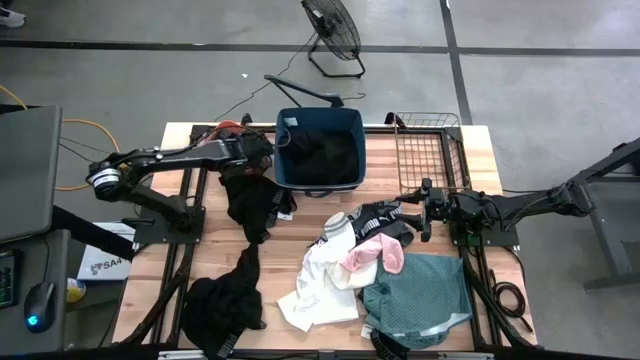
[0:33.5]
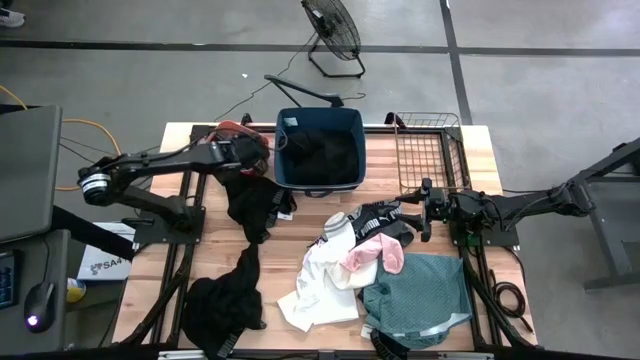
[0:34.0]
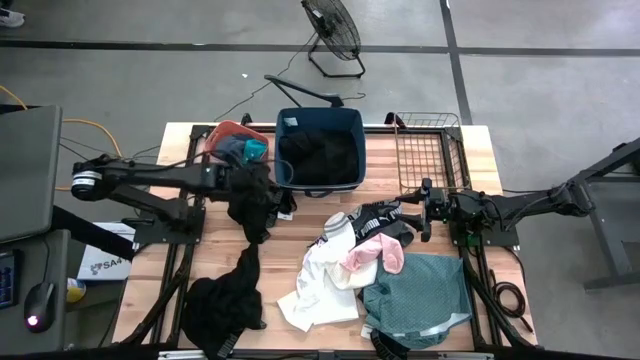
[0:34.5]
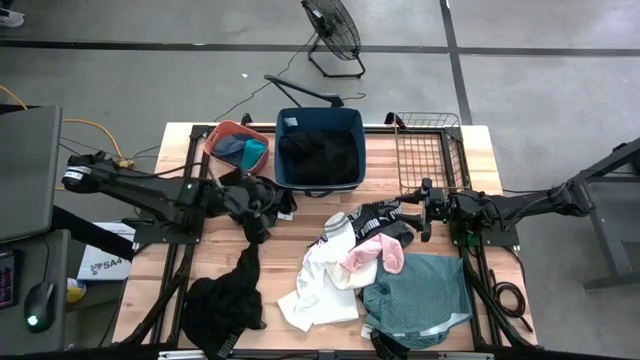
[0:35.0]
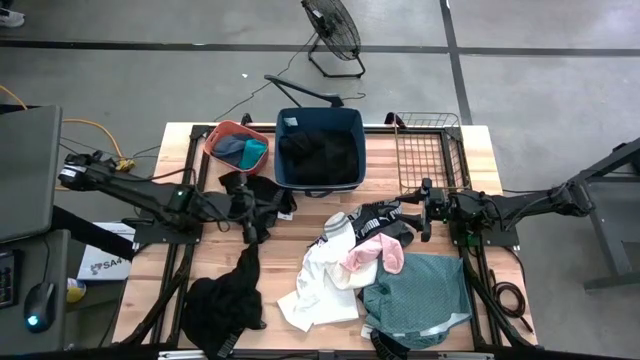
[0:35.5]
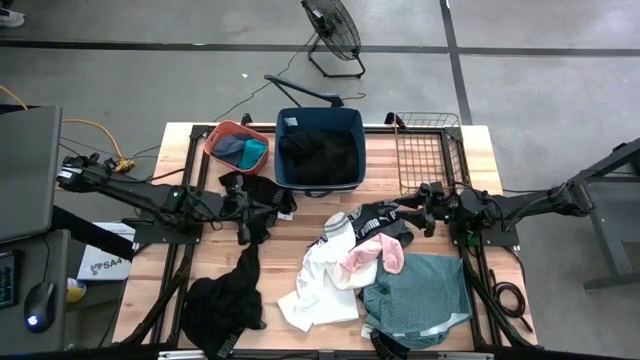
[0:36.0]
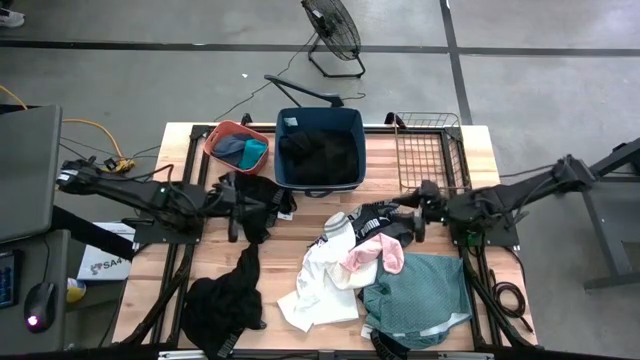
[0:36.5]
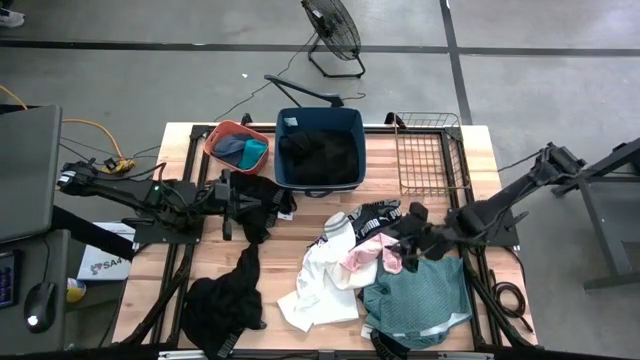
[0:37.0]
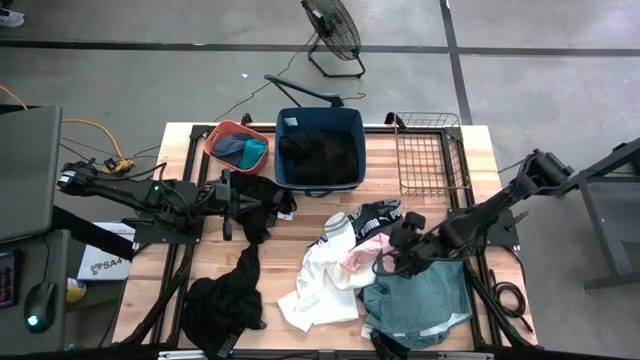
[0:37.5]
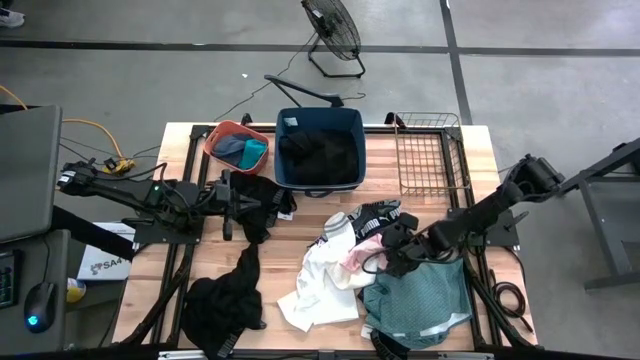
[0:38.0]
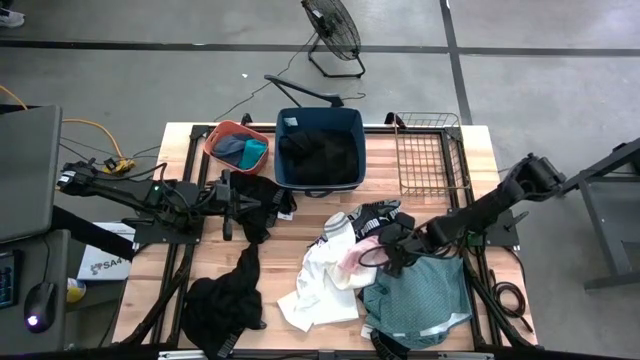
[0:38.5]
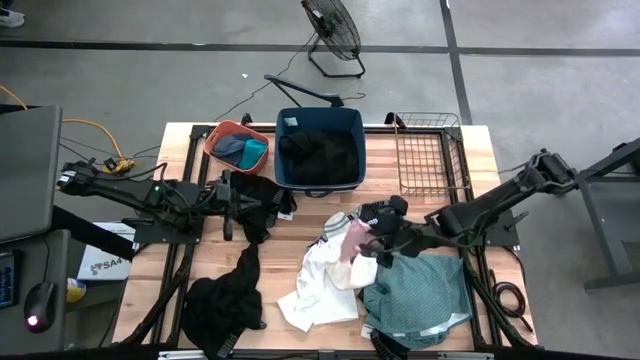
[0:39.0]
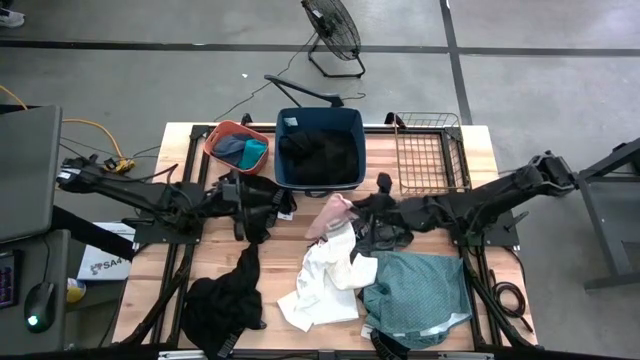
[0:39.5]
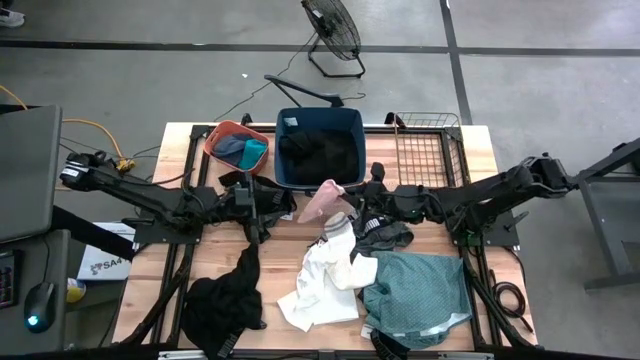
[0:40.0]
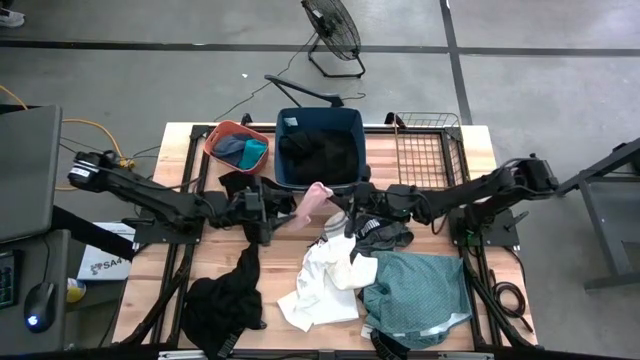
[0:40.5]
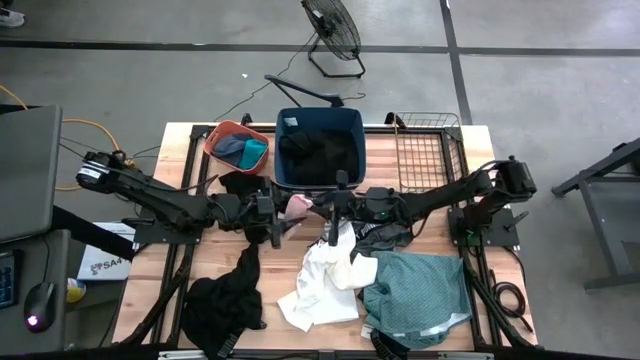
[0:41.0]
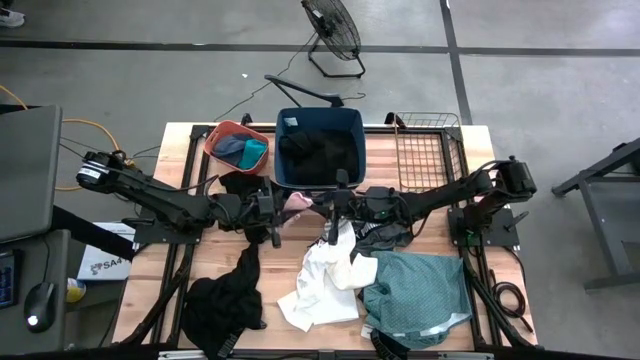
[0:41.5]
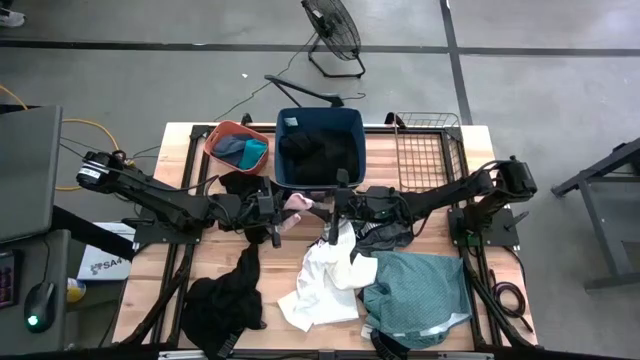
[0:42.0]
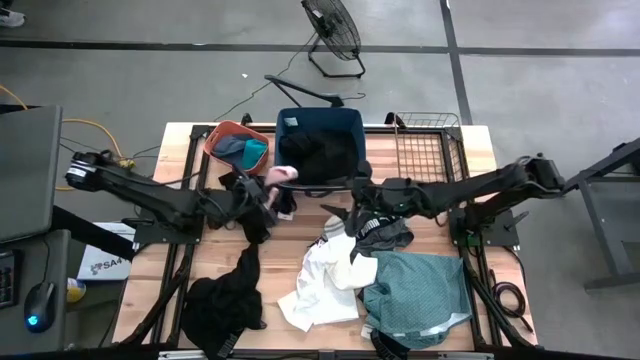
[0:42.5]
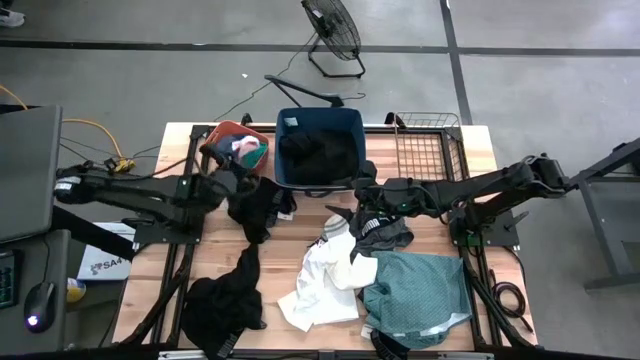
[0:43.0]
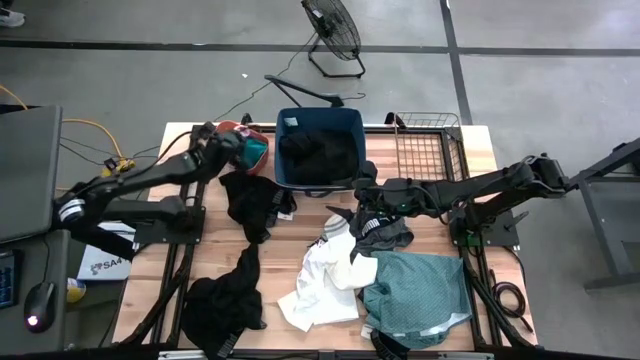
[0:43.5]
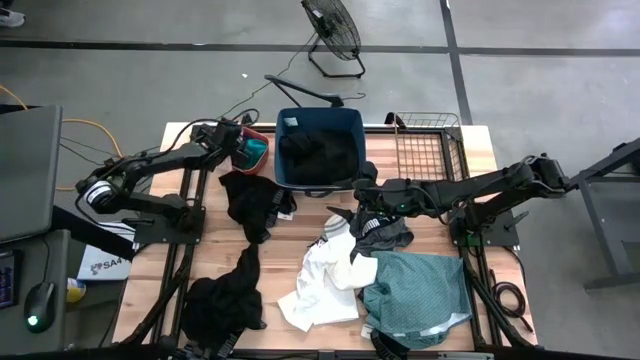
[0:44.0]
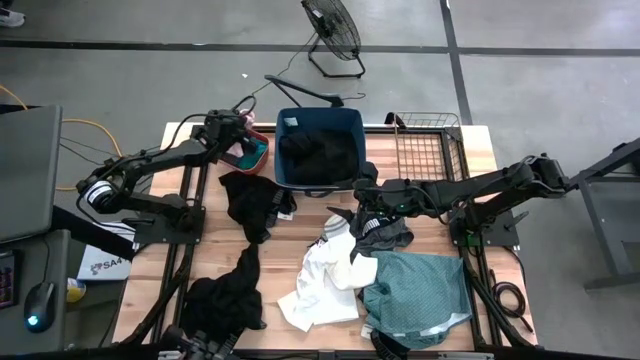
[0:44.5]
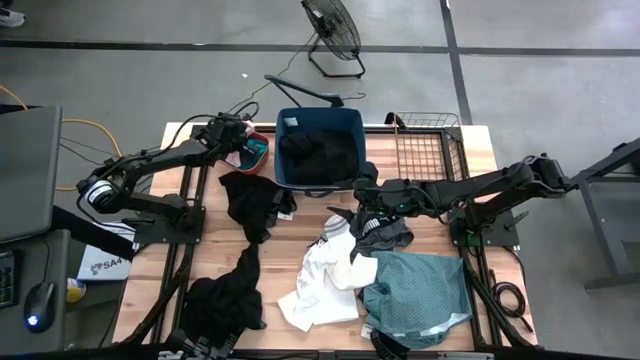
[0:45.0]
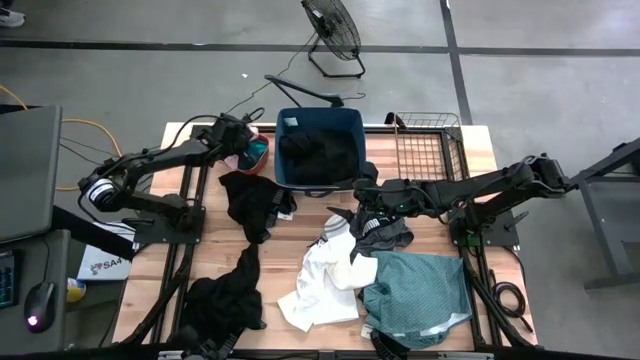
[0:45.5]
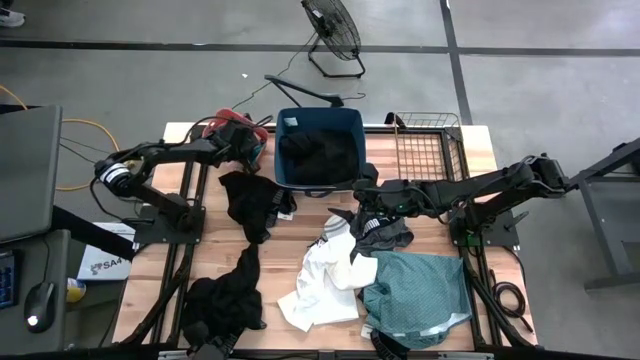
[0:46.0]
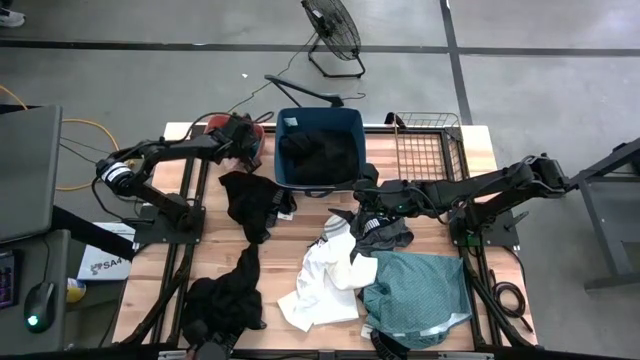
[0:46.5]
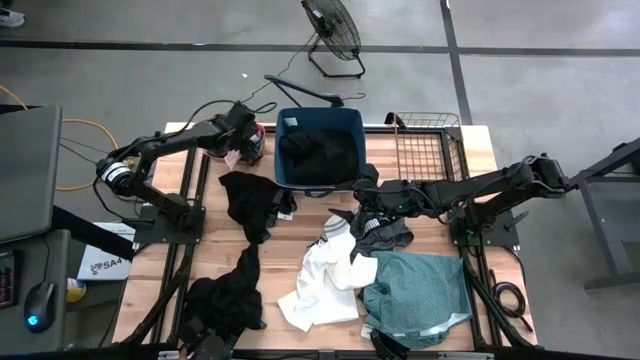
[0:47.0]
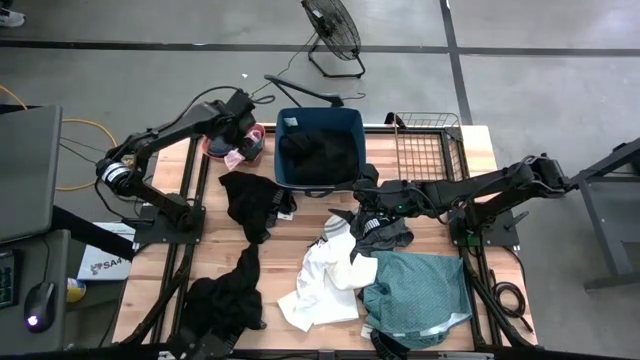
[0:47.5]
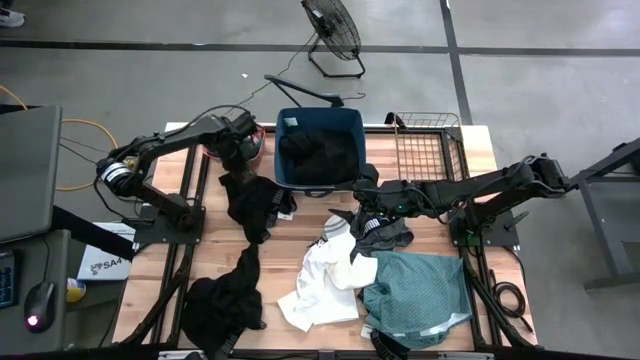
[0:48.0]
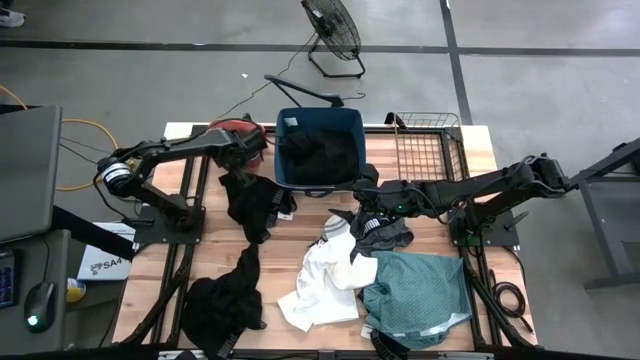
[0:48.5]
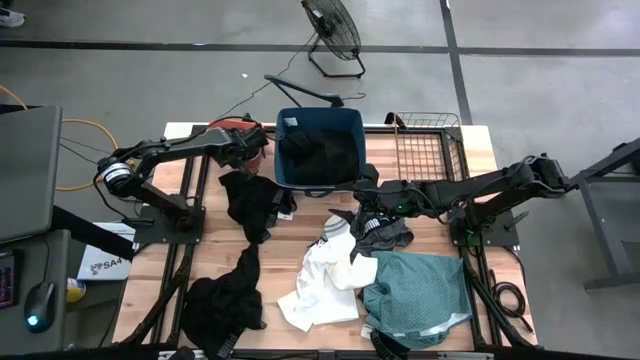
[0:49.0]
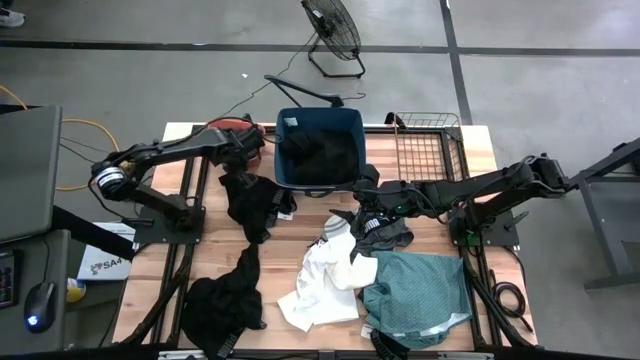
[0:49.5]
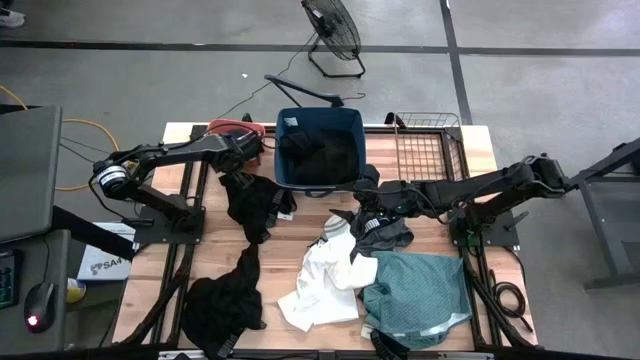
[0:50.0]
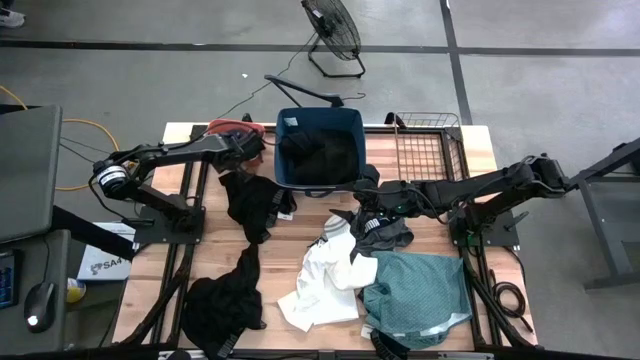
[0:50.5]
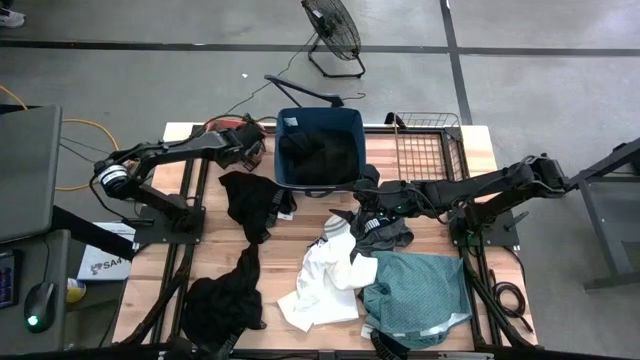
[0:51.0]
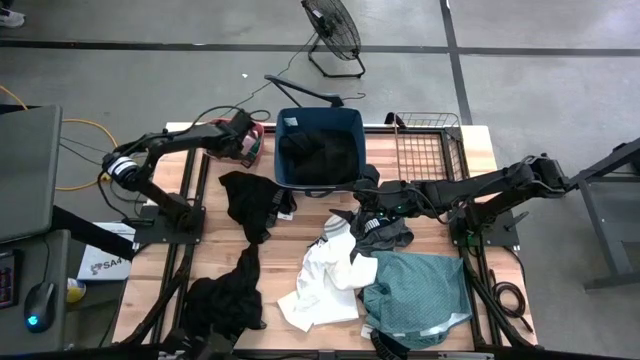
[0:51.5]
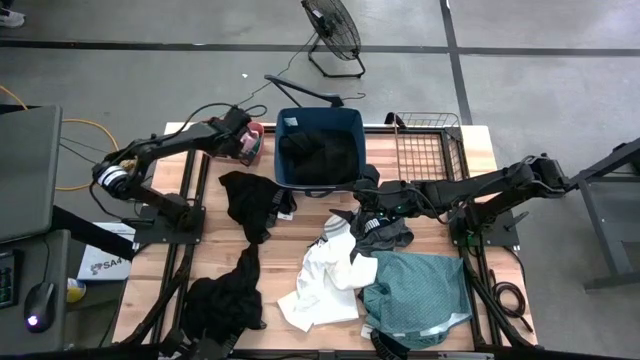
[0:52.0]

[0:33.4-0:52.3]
Task: Pick & Place Cloths
Put the light pink sock into the orange bin

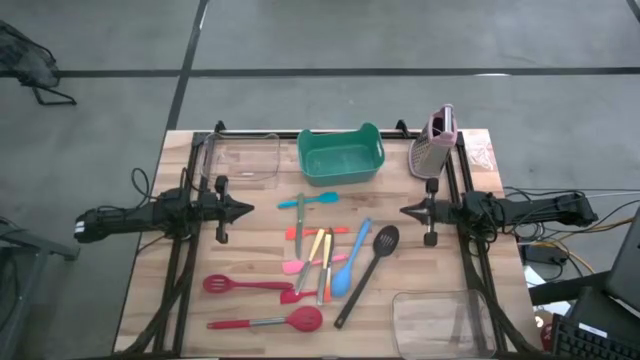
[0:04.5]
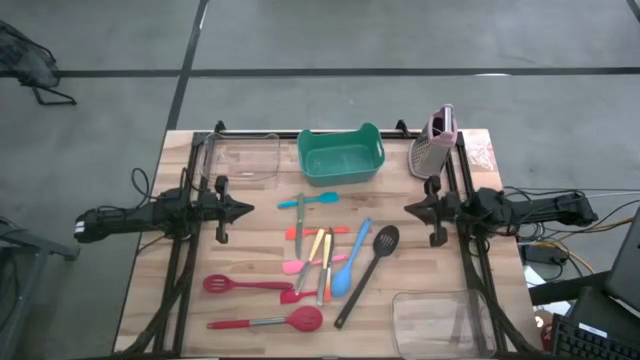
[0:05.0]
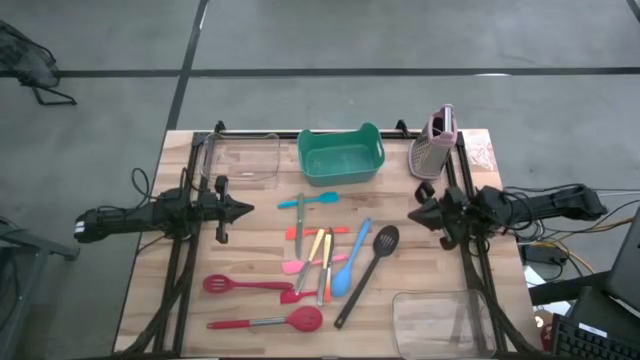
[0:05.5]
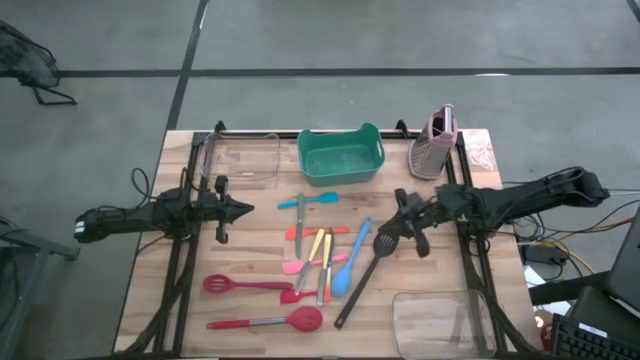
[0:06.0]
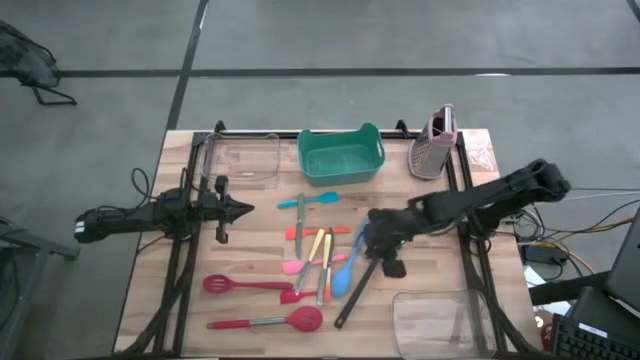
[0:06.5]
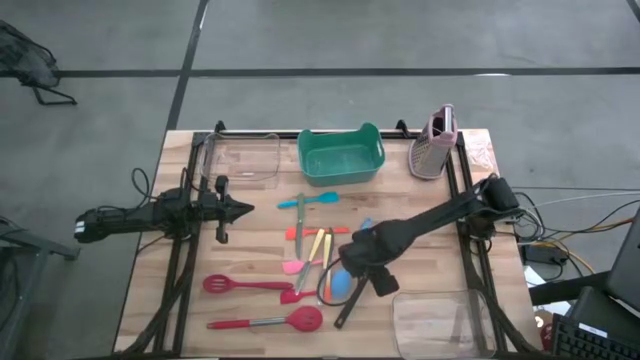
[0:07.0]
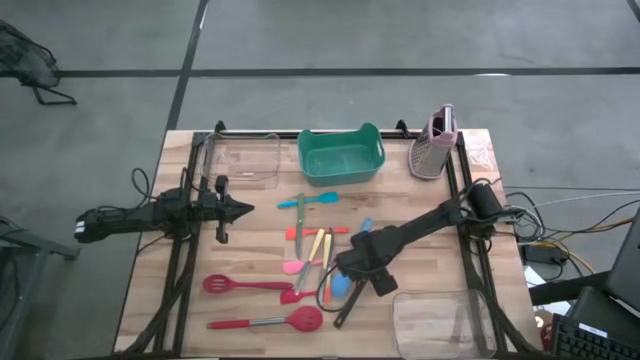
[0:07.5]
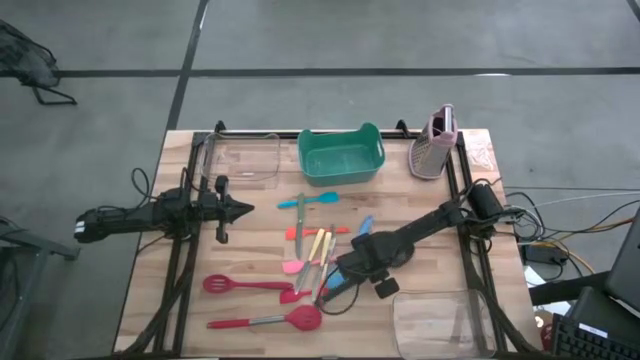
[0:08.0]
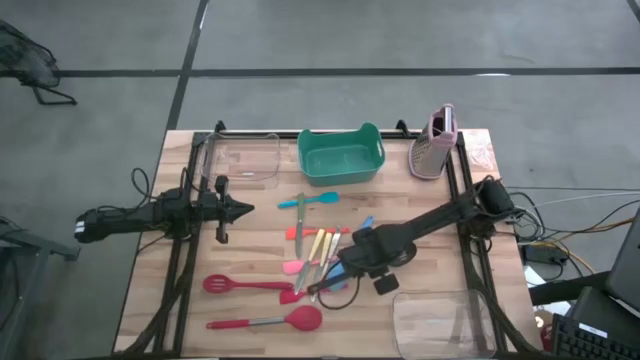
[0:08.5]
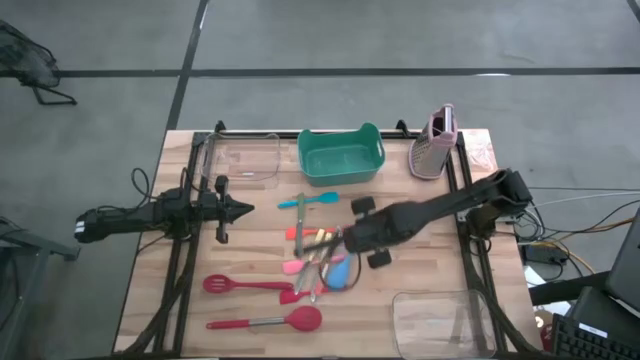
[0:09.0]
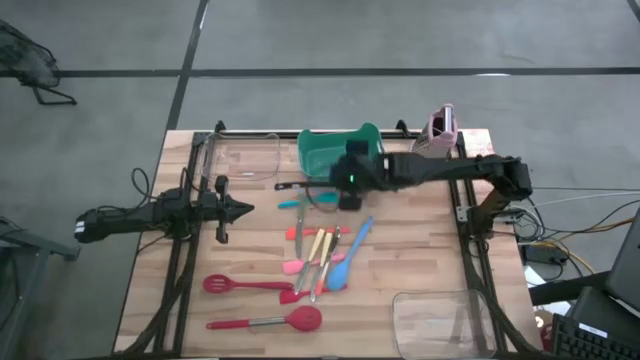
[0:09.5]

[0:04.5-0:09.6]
Task: Pick & Place Kitchen Items
Put the black serving spoon into the green bin
